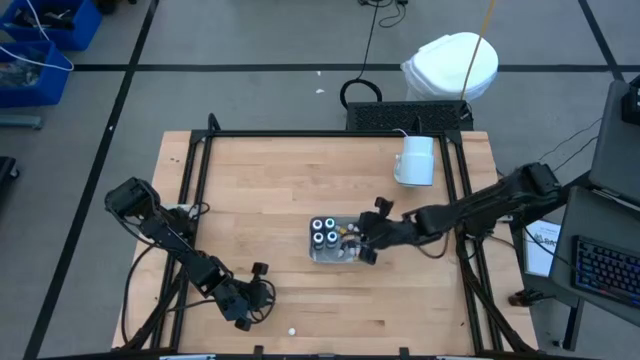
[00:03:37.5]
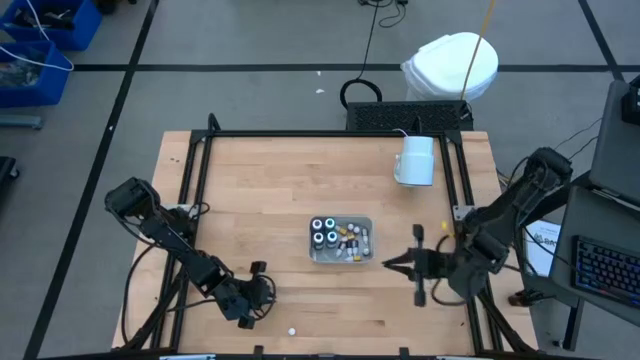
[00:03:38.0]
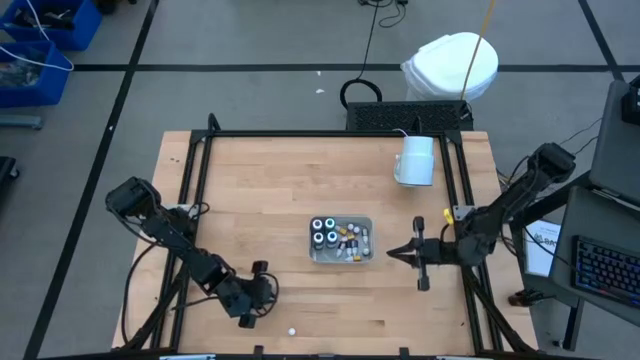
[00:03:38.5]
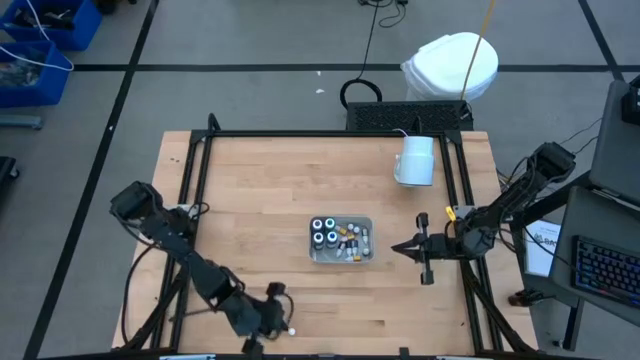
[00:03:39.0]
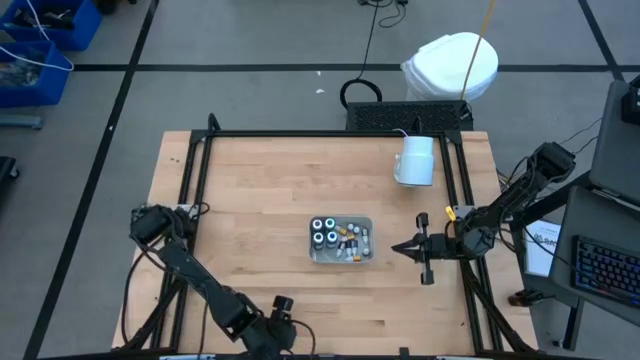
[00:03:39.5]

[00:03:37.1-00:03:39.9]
Task: Pick & Place food coloring
Put the small orange food coloring into the gray bin

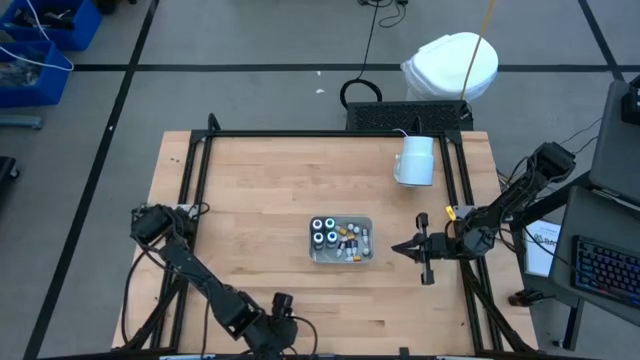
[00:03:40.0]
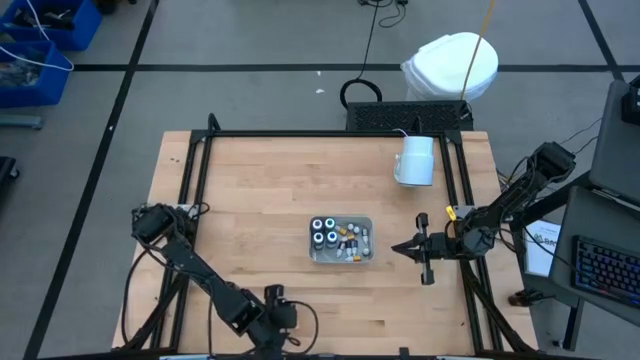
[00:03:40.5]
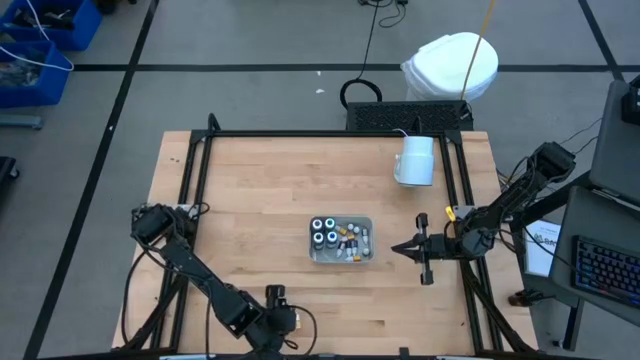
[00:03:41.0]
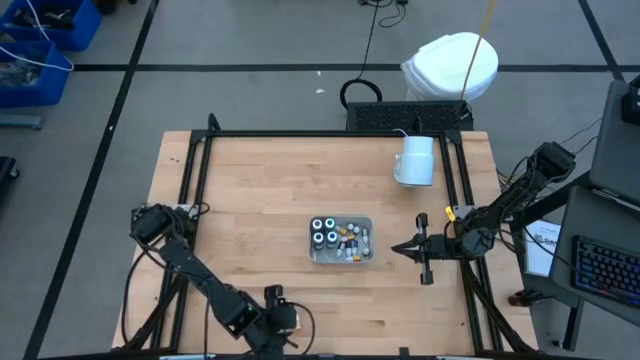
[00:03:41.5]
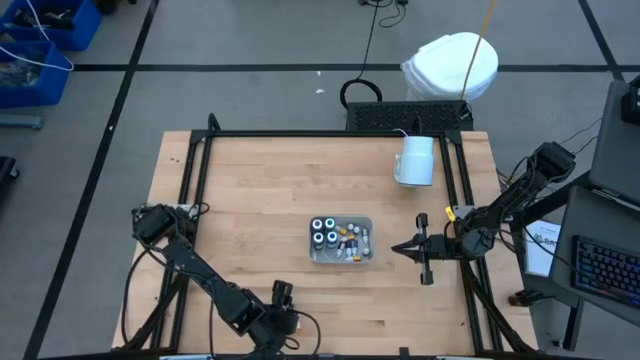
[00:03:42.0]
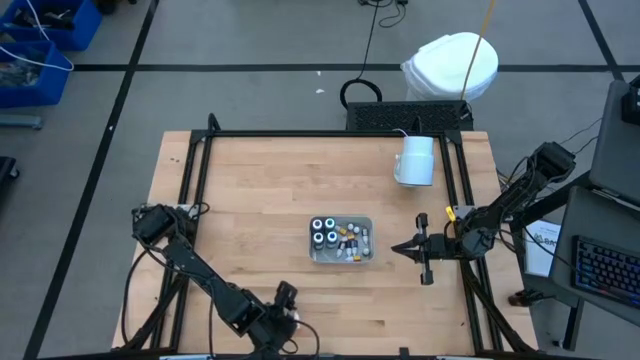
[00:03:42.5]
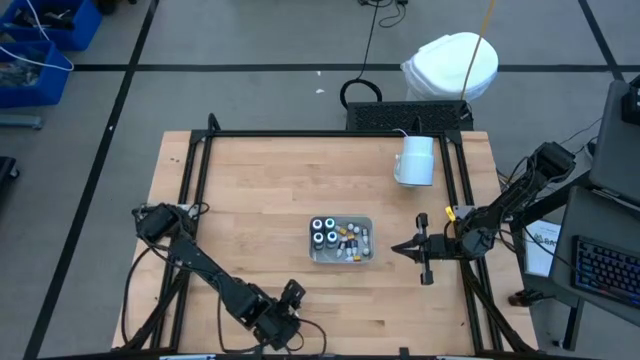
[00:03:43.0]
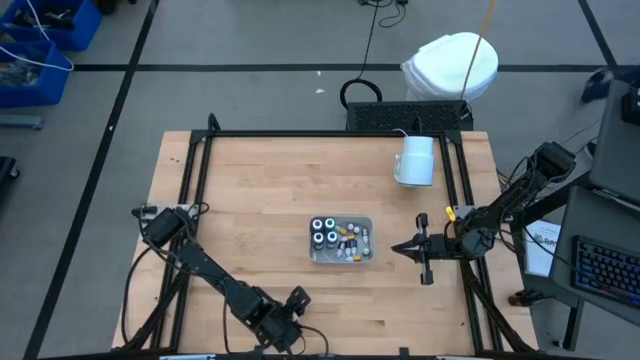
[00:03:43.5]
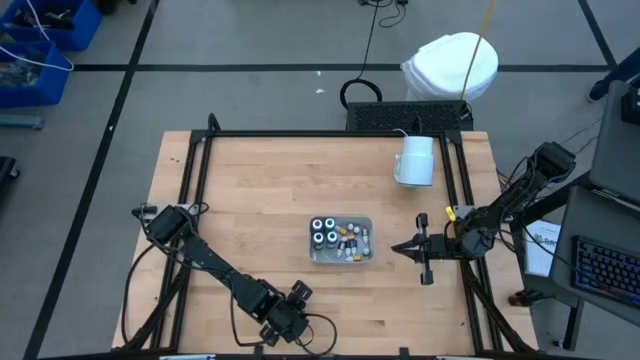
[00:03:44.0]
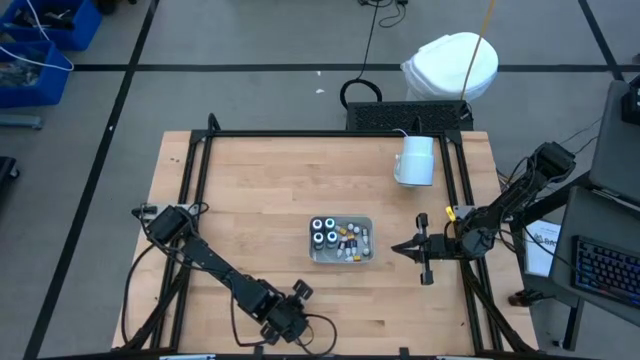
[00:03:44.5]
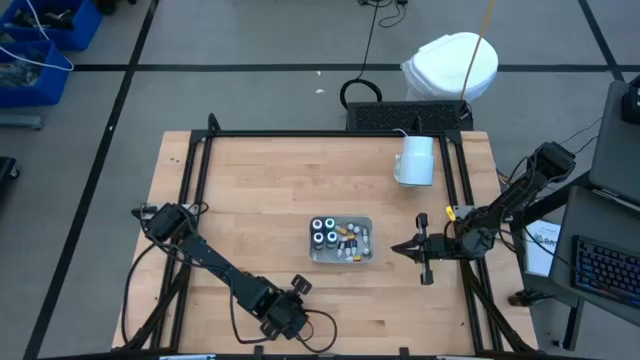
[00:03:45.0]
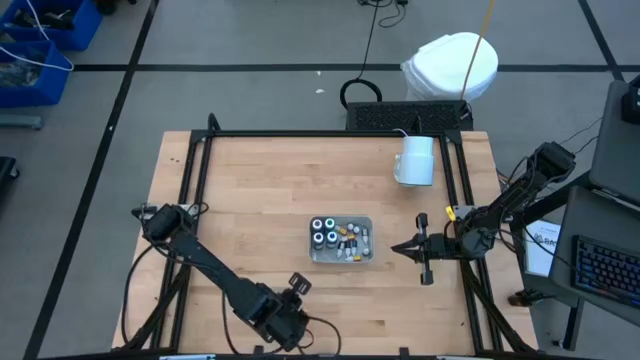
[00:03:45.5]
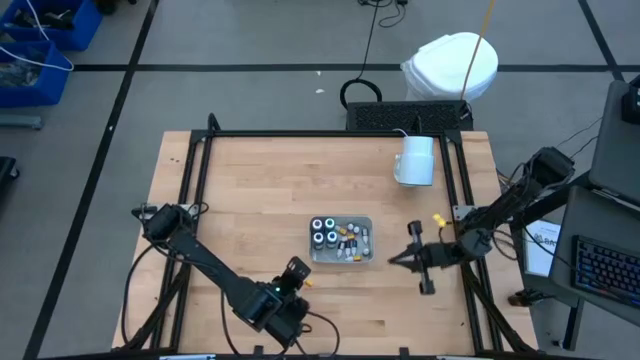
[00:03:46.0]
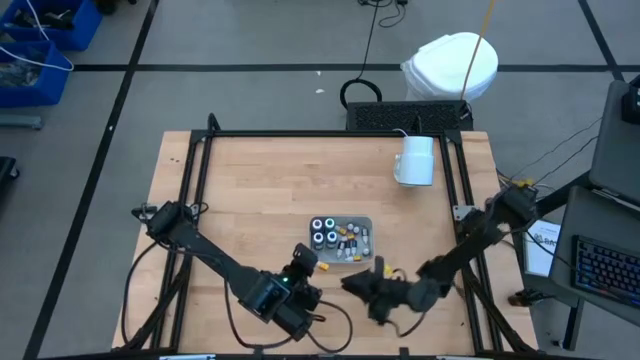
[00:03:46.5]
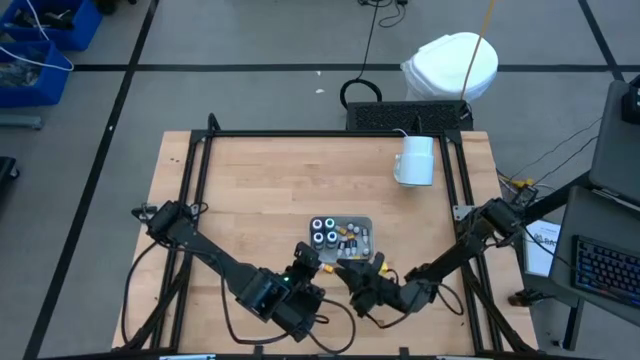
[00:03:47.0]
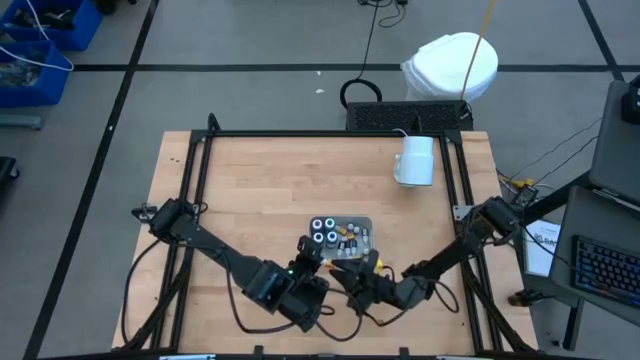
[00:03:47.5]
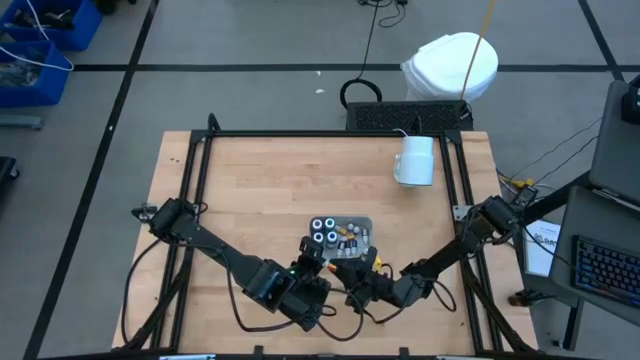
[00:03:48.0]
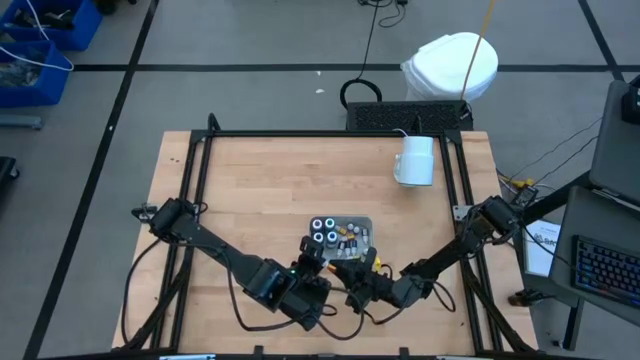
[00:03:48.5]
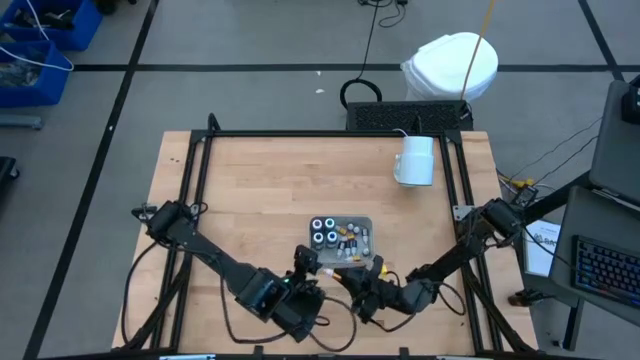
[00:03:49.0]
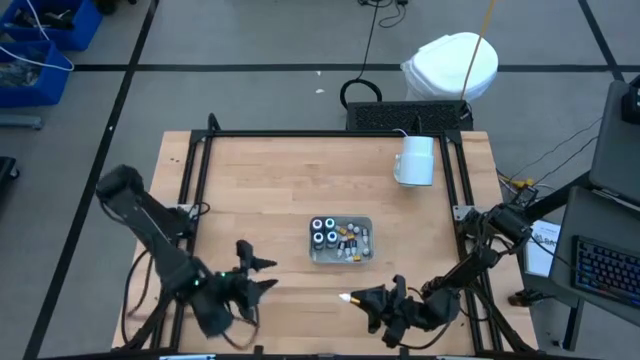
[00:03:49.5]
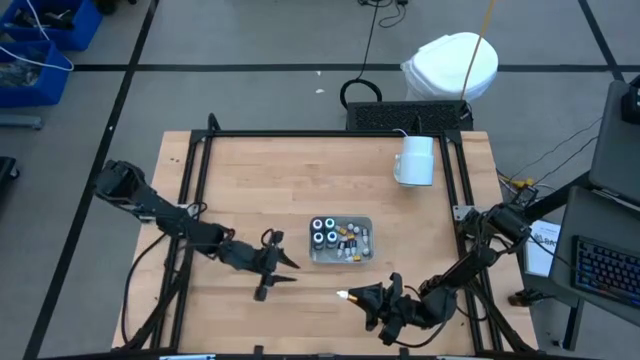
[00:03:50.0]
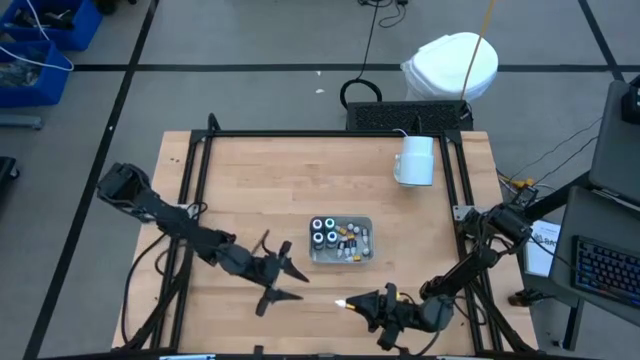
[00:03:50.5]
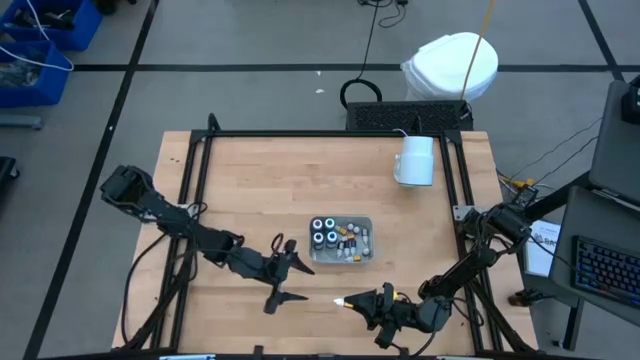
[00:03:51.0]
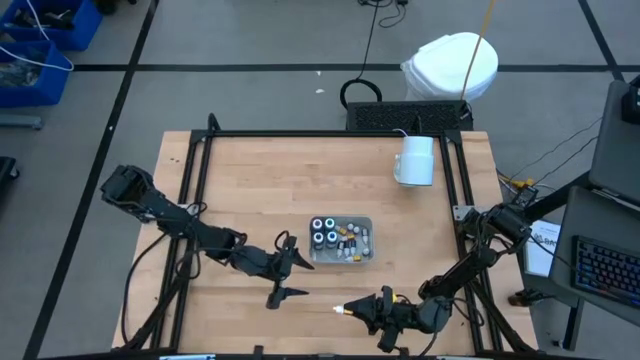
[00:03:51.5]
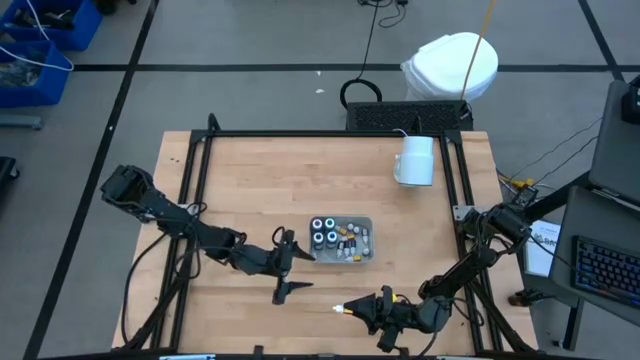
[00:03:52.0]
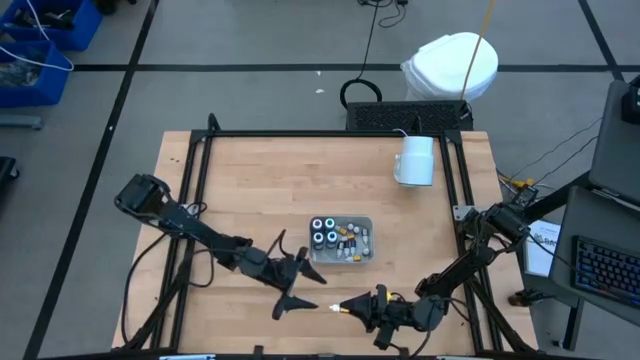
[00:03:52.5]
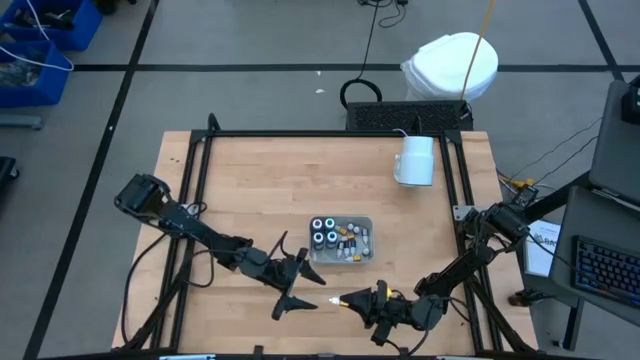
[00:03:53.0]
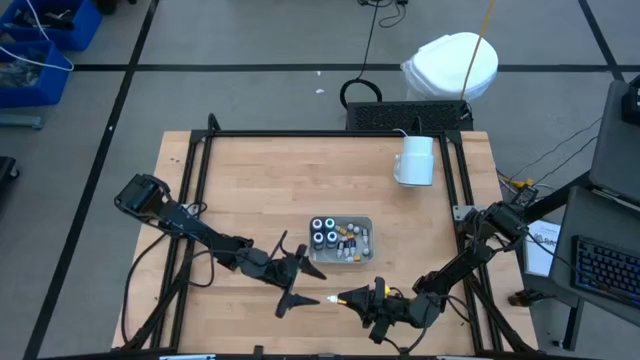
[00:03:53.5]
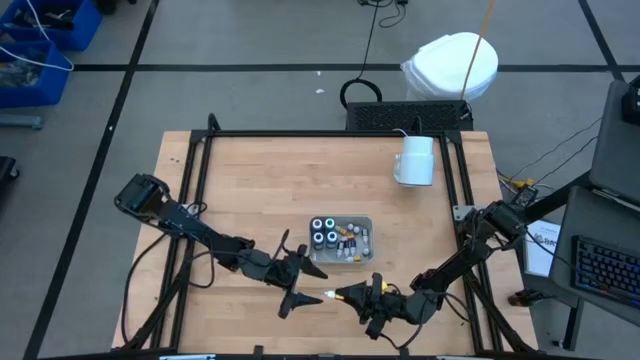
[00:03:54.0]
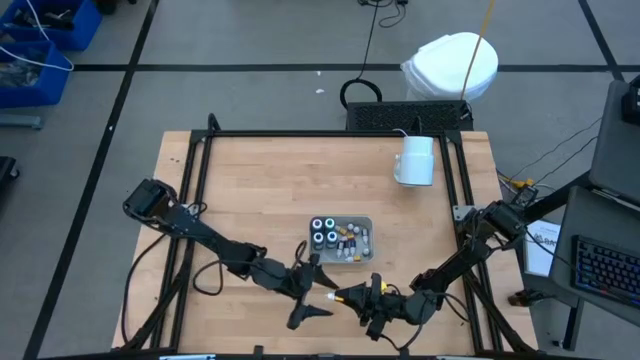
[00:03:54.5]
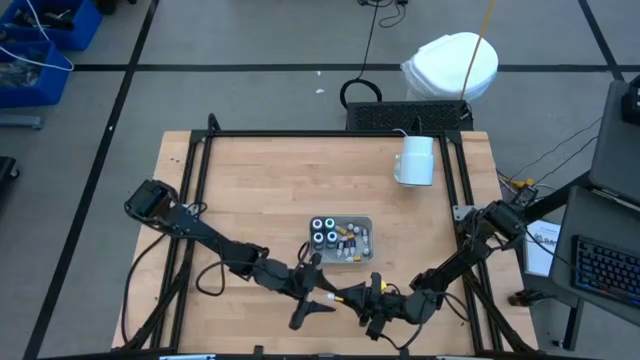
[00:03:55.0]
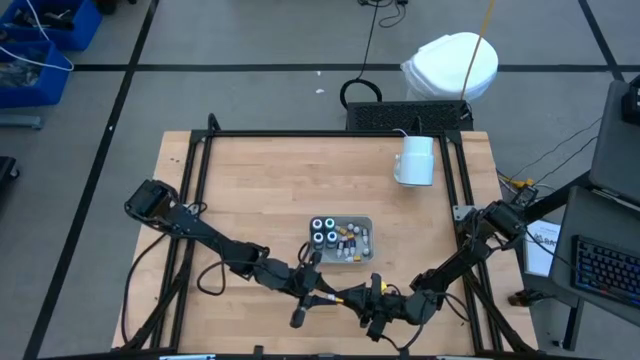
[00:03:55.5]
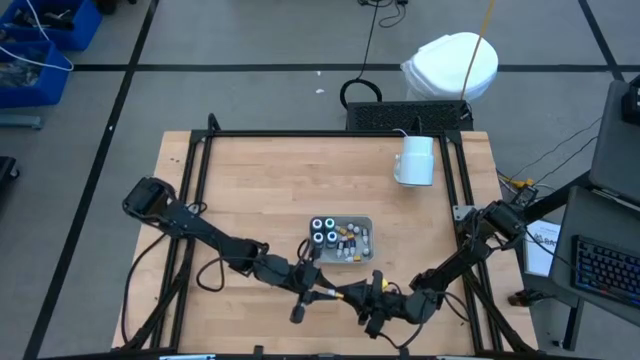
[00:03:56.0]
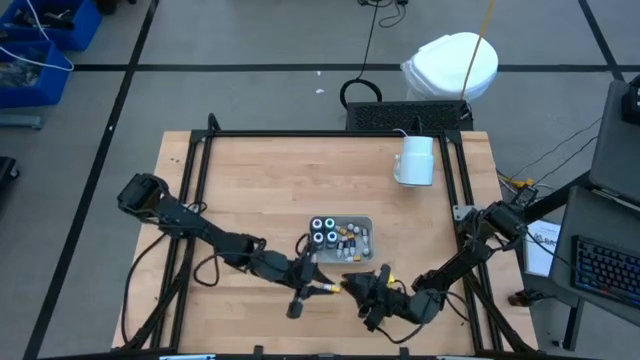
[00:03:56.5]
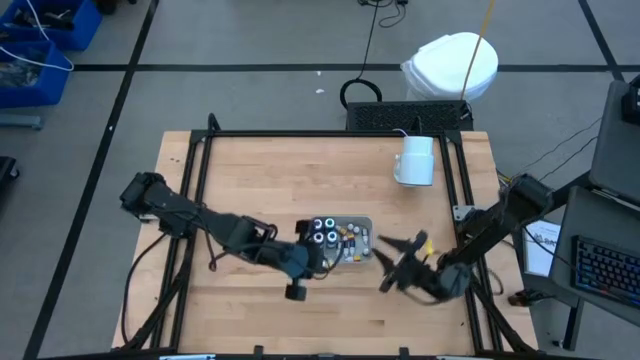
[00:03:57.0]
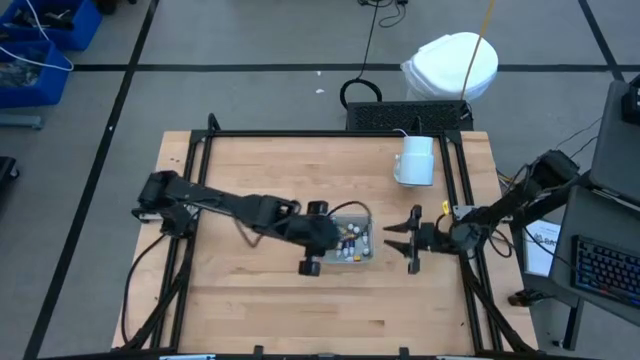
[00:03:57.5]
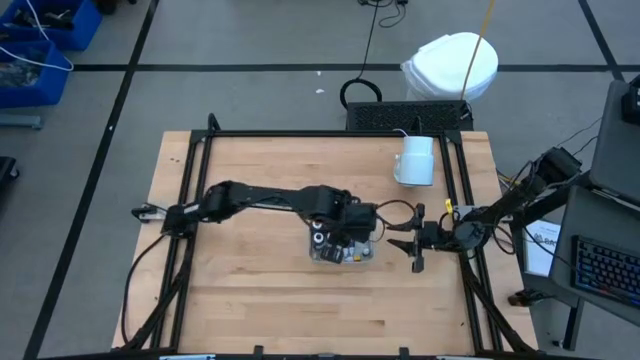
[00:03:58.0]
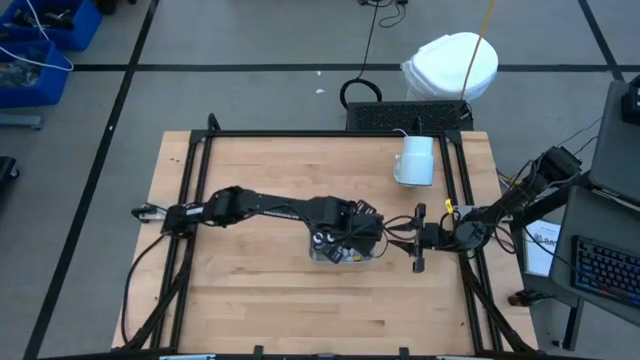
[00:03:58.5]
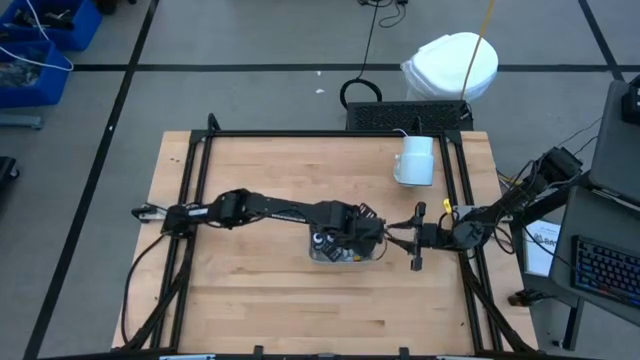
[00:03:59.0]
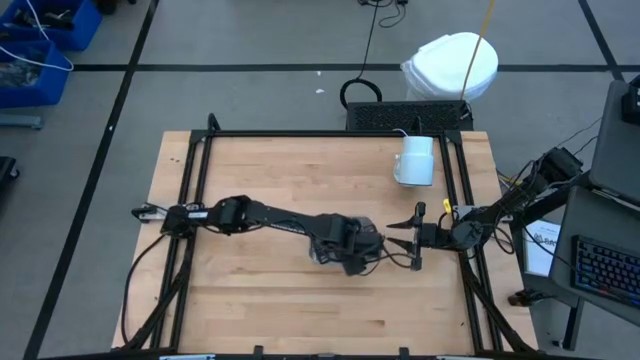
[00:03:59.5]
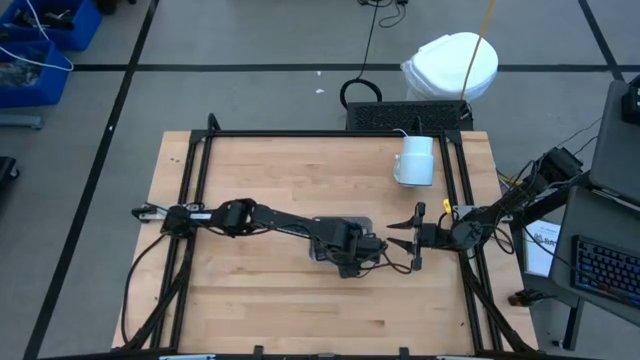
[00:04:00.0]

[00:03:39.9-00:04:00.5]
Put the small orange food coloring into the gray bin
